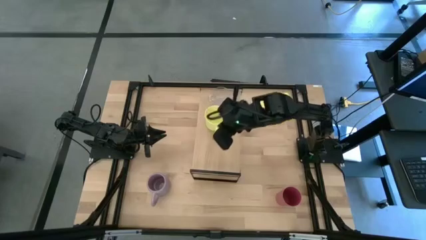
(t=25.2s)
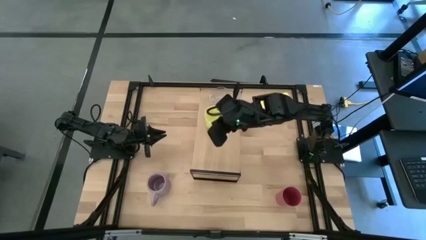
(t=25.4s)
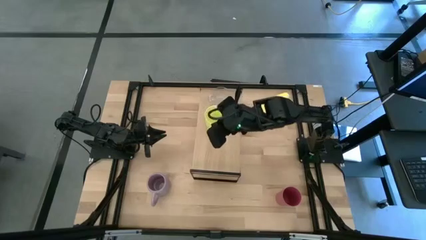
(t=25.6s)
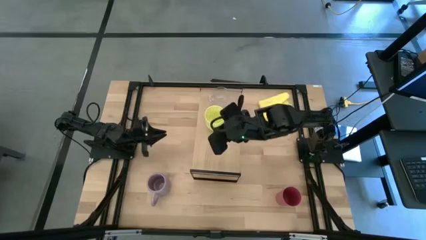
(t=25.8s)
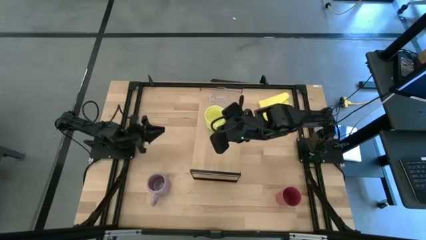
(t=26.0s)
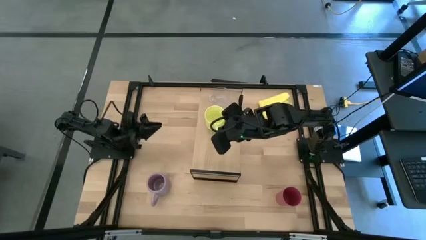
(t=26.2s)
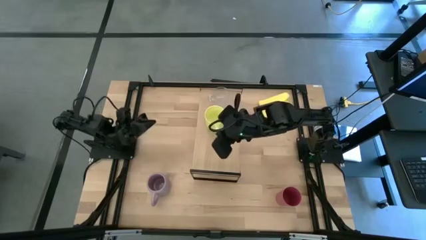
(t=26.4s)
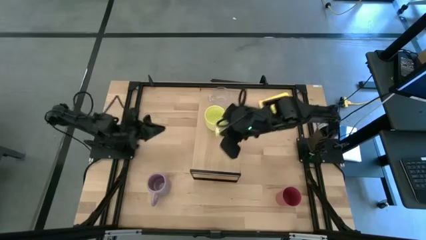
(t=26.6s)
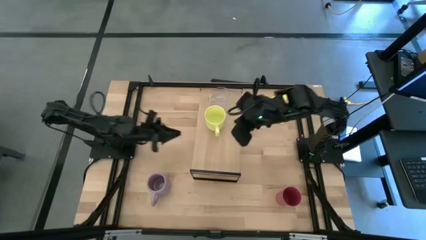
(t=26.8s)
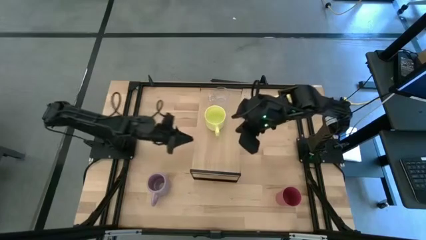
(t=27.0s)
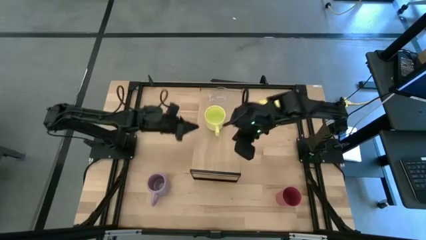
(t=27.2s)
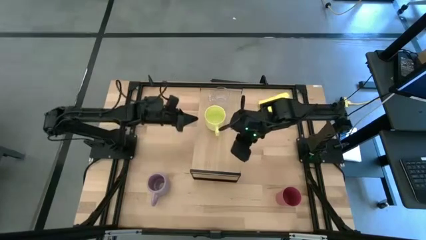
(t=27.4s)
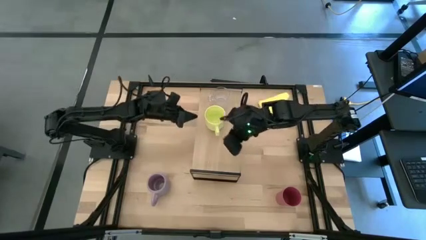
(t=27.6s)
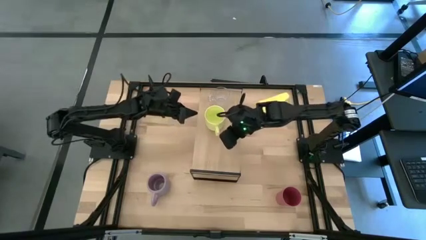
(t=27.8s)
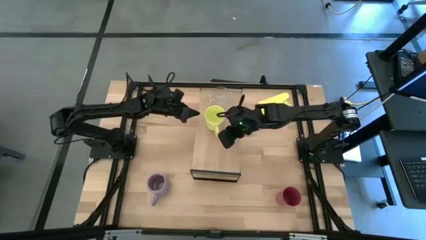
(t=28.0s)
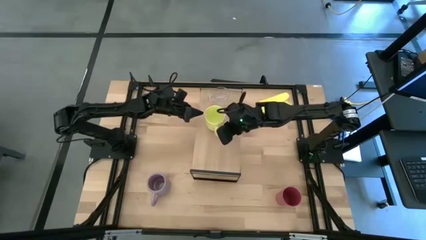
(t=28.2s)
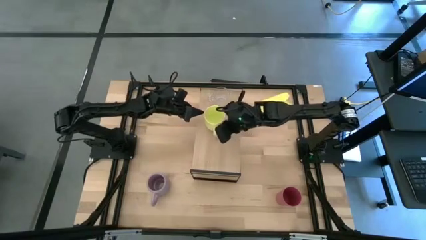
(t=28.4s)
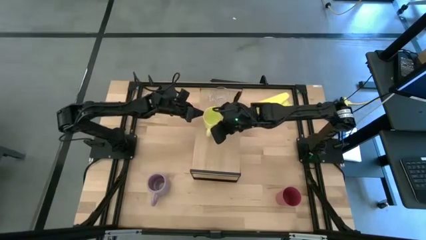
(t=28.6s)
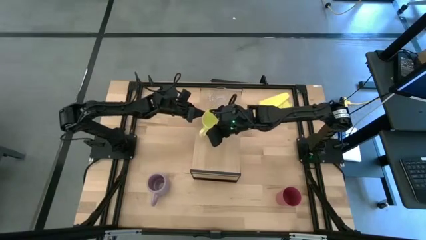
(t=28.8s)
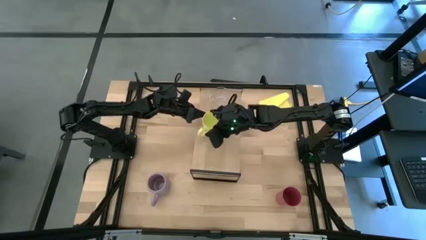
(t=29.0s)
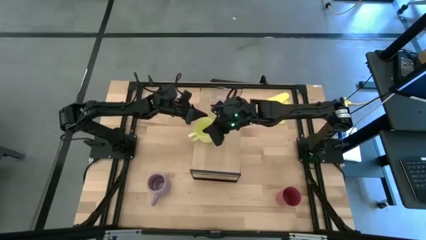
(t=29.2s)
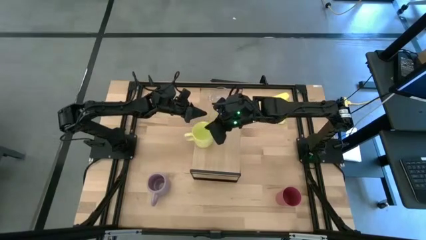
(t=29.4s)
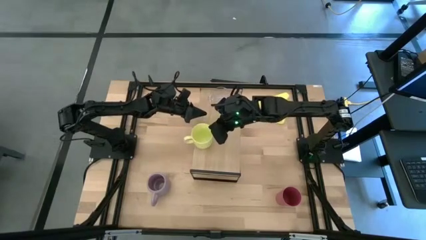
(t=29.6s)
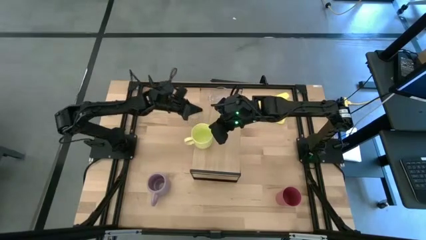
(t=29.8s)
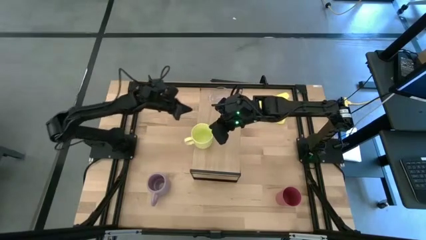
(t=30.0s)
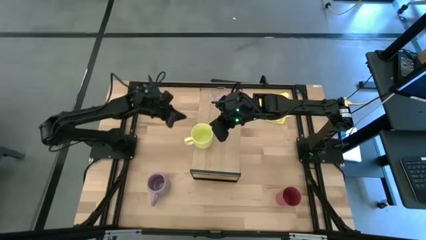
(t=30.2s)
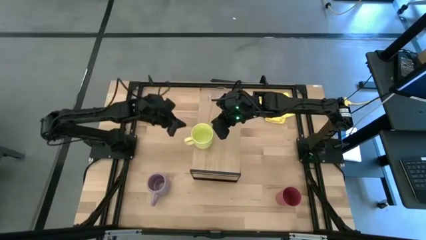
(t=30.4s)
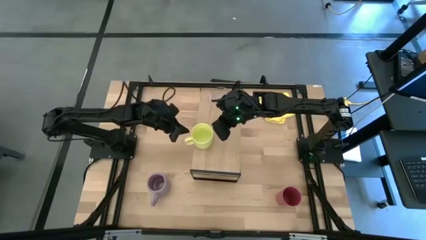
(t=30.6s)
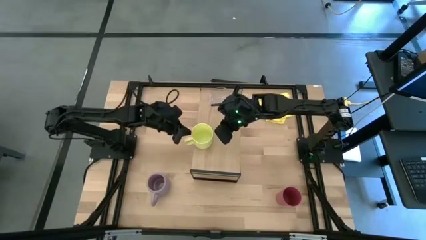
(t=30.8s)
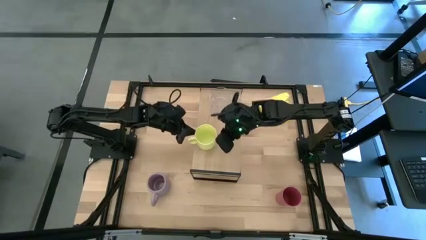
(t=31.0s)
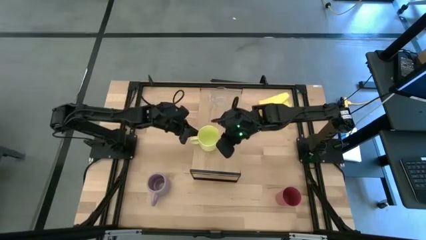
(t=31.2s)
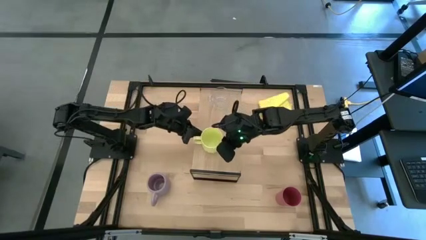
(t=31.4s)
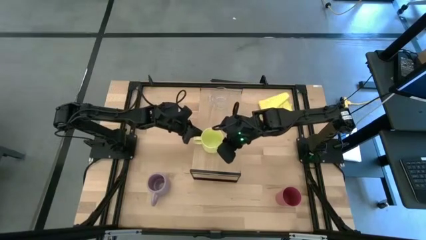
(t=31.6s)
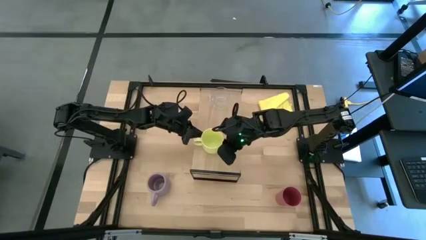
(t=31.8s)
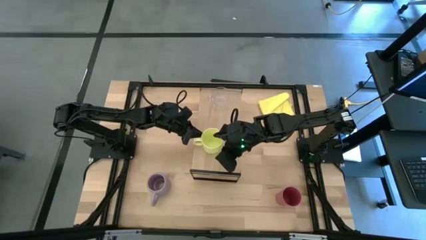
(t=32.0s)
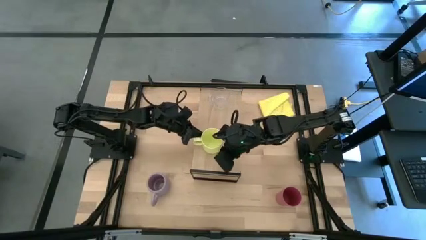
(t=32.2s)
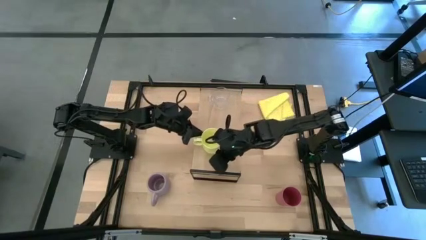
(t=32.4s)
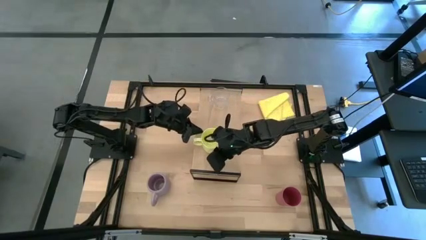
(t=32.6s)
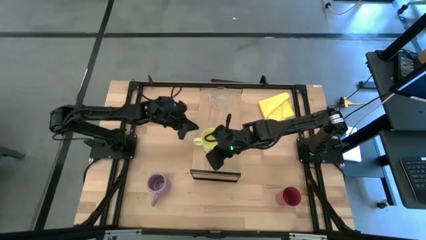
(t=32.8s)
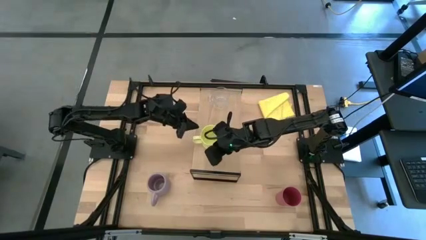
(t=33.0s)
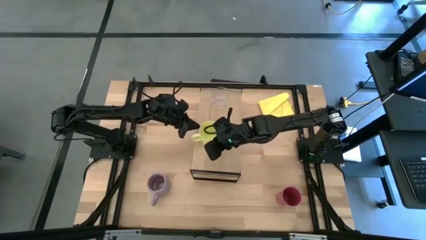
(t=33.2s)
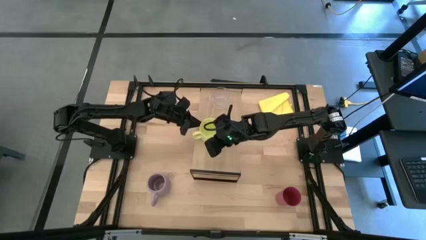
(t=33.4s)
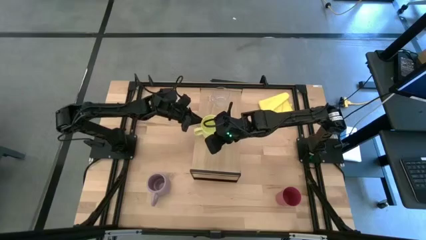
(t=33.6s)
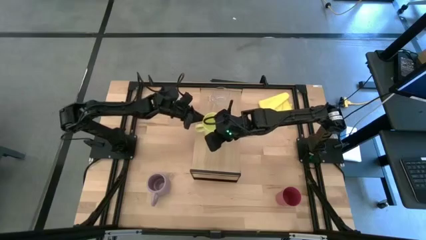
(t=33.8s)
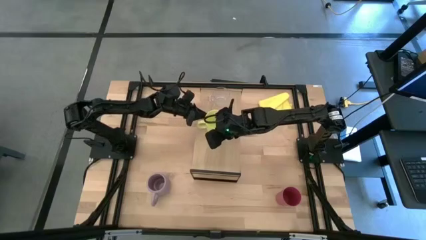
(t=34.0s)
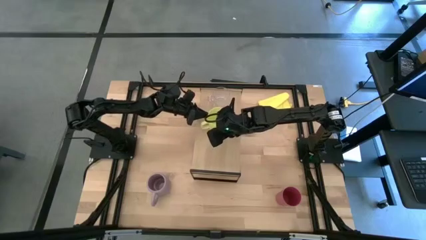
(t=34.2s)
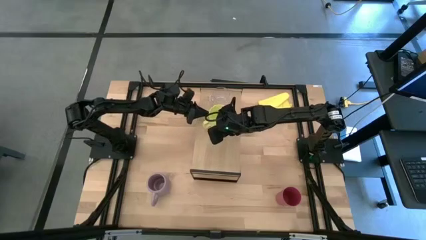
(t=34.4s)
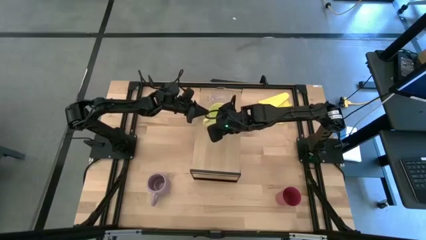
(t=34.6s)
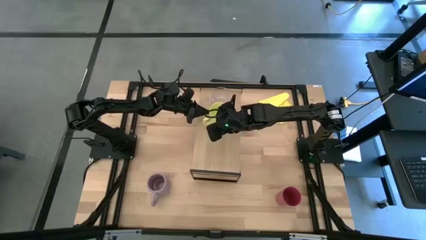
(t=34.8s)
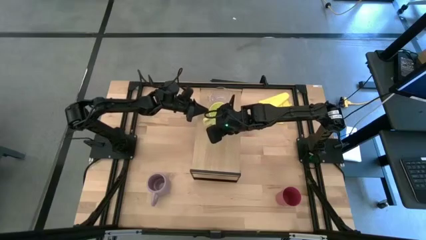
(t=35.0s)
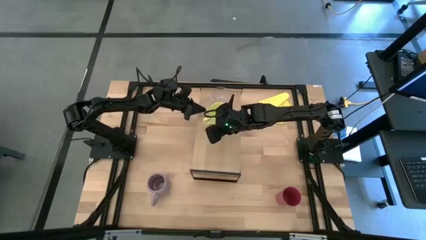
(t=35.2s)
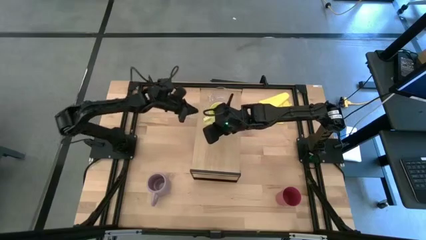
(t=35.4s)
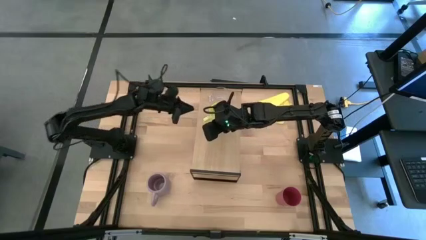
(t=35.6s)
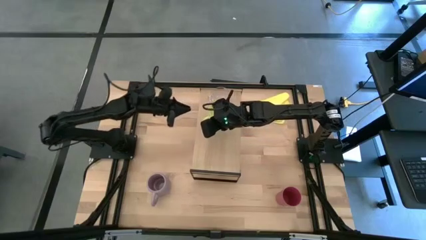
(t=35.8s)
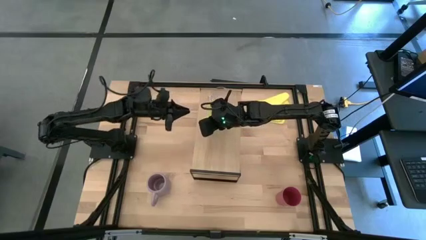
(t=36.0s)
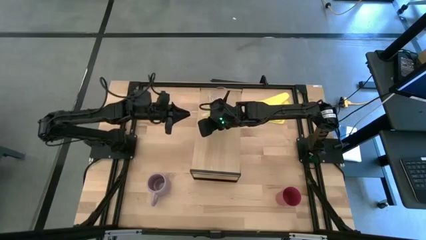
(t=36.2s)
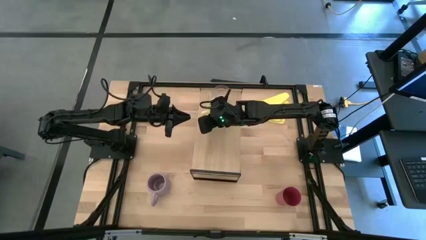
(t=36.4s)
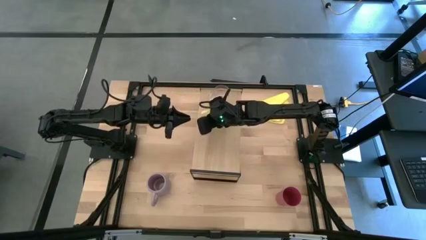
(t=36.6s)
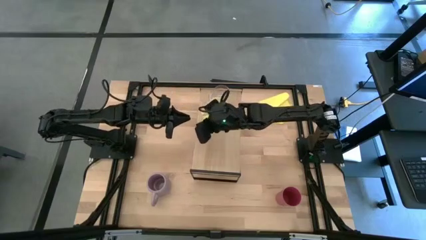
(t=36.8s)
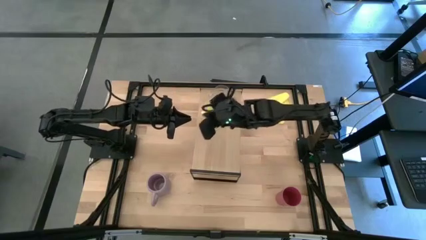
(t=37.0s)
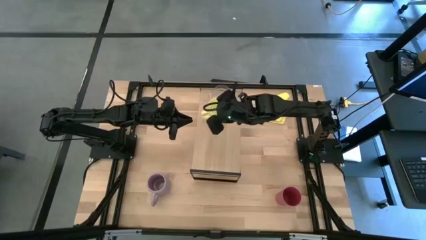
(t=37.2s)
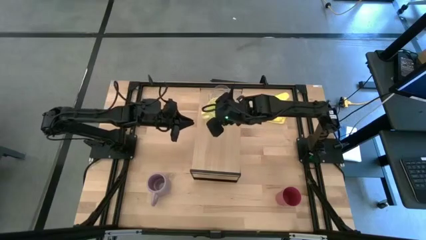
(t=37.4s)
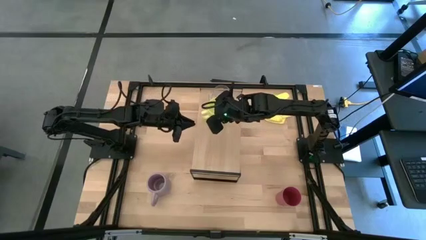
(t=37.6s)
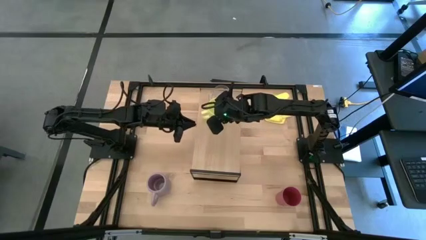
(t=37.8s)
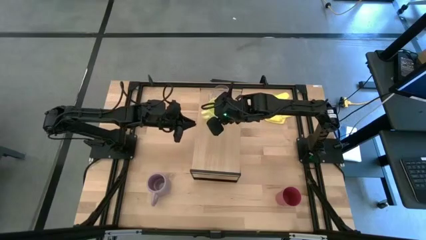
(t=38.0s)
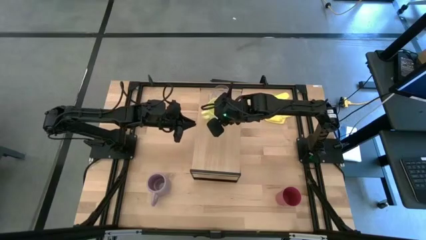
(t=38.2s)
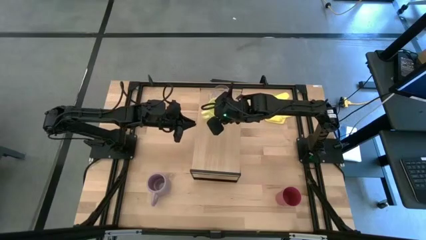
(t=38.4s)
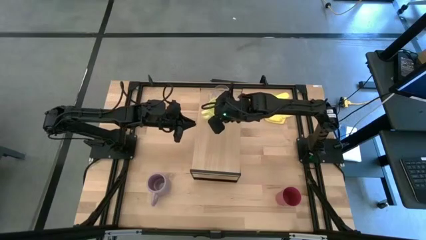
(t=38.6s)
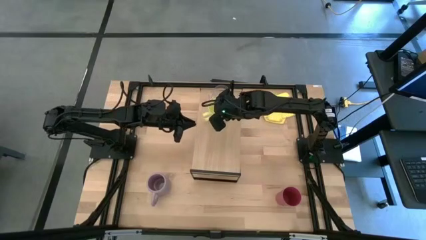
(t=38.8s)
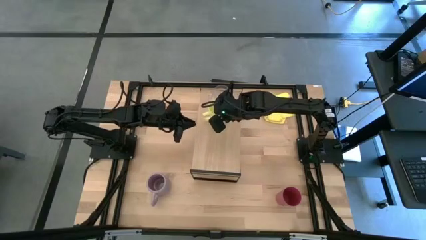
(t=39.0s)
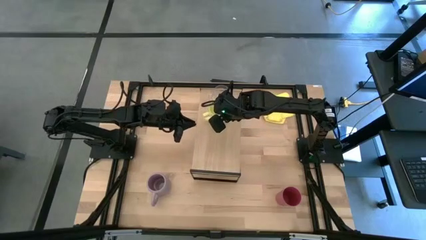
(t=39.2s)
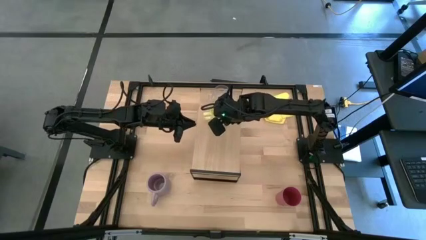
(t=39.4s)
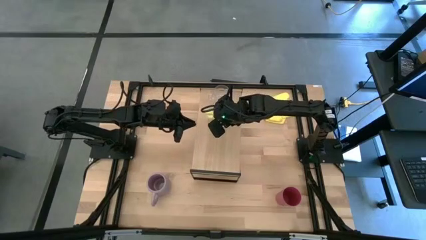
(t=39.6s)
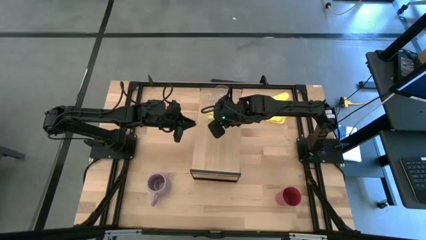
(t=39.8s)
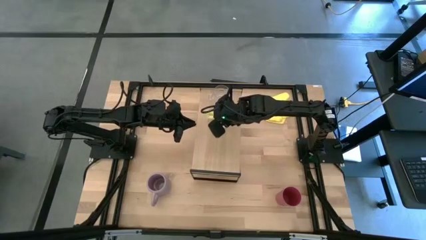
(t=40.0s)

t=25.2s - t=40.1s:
Task: Stack small to large cups/mugs on shelf
Put the yellow mug on the shelf
